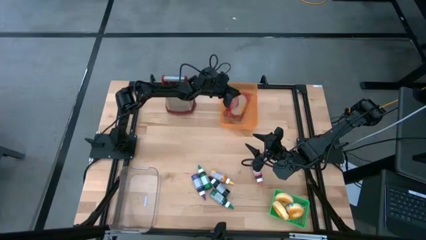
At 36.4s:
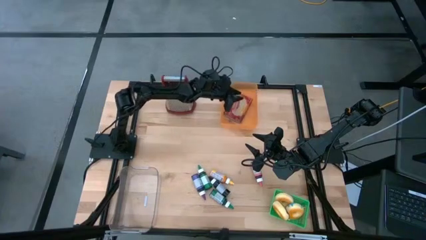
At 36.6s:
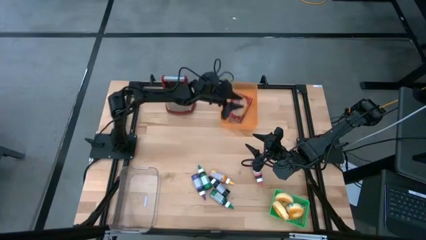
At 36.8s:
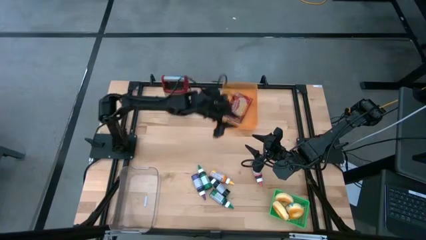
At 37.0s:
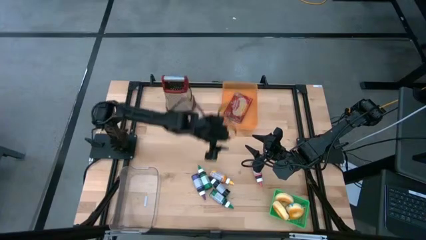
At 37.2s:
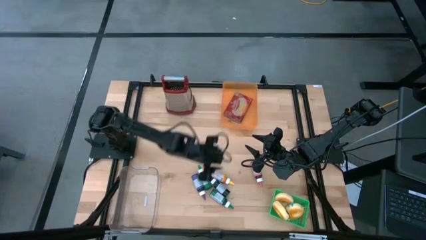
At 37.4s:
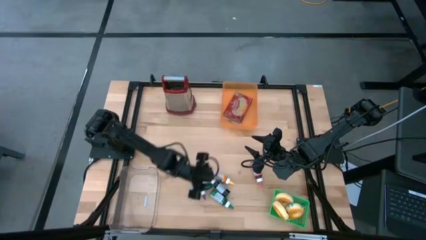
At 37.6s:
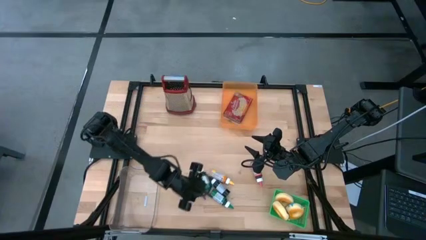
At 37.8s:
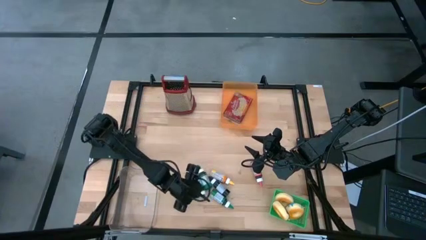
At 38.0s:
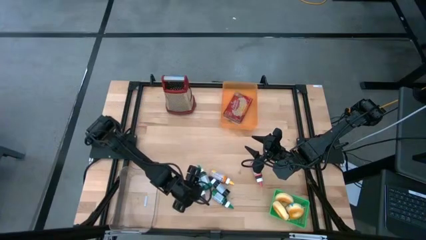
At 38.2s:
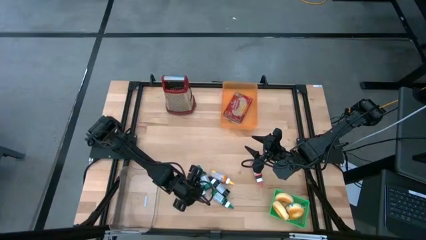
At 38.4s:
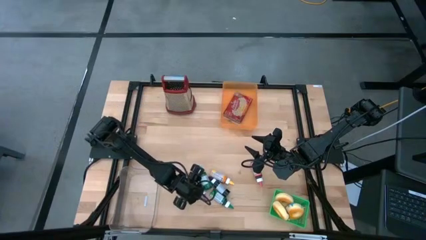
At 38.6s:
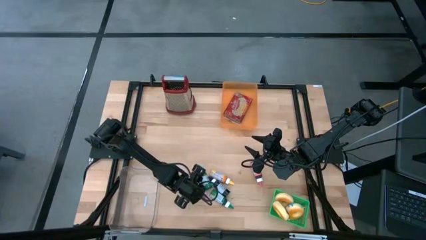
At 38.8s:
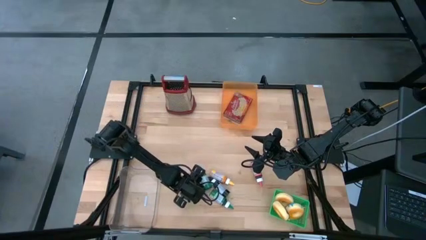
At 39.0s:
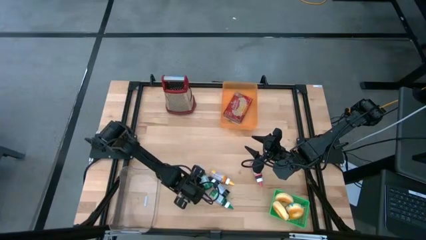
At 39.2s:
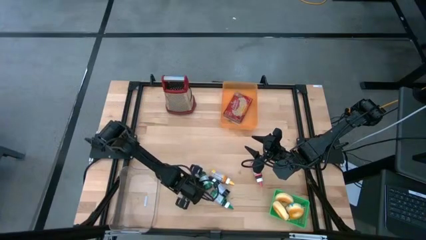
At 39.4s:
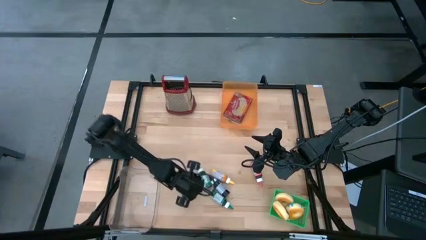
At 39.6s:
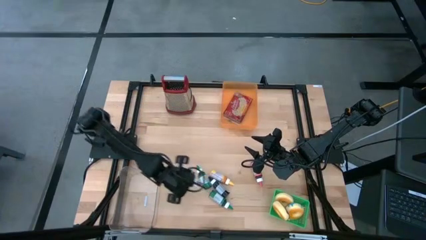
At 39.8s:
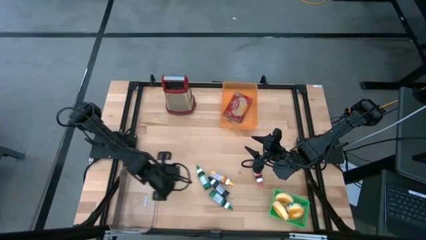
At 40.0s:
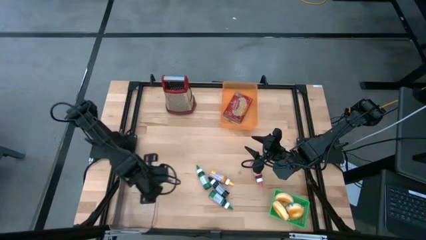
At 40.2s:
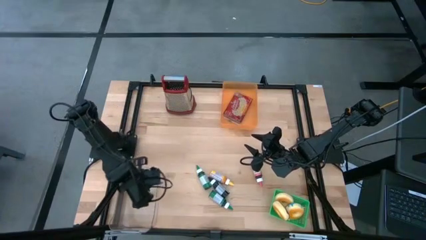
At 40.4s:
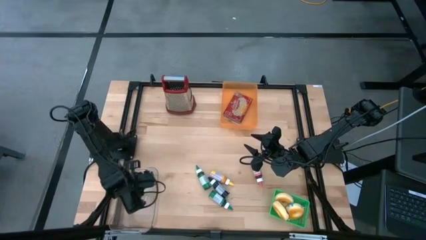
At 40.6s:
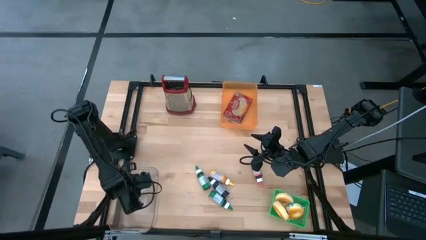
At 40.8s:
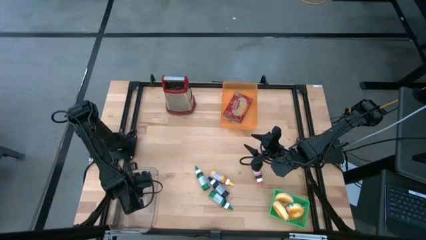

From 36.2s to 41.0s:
Put the violet food coloring bottle into the transparent bin

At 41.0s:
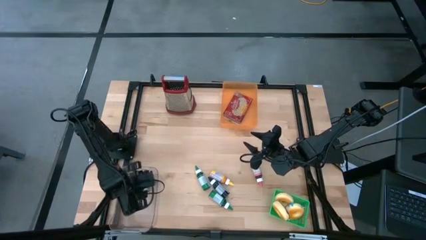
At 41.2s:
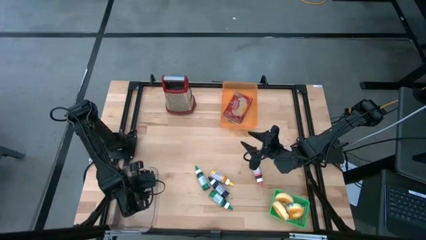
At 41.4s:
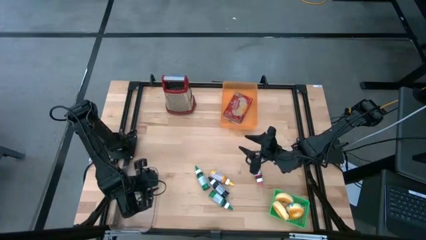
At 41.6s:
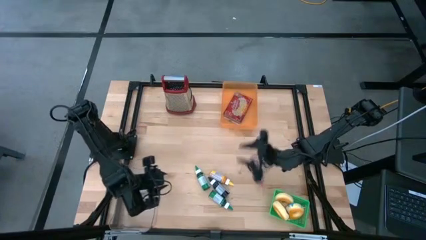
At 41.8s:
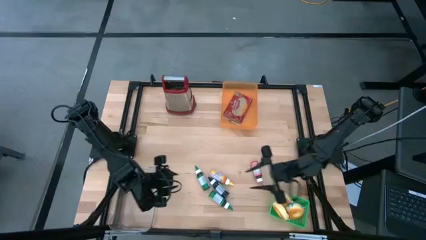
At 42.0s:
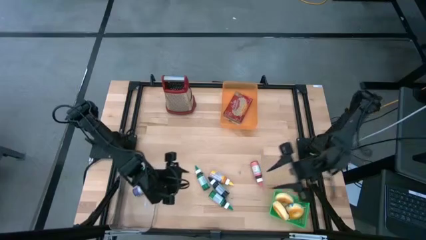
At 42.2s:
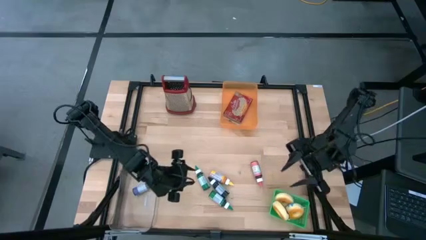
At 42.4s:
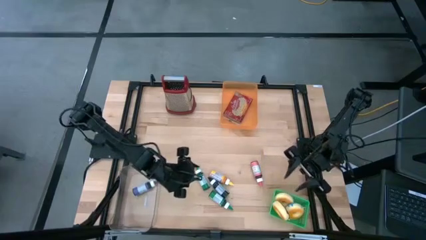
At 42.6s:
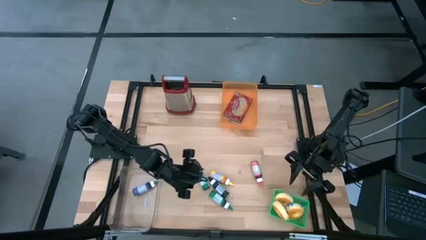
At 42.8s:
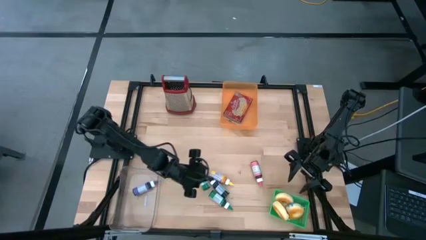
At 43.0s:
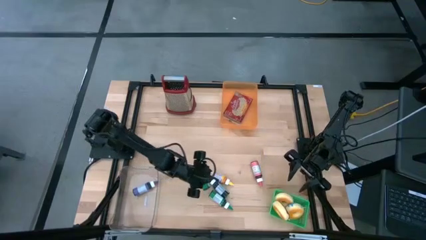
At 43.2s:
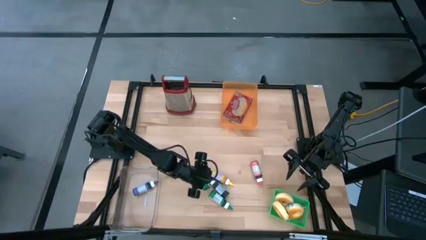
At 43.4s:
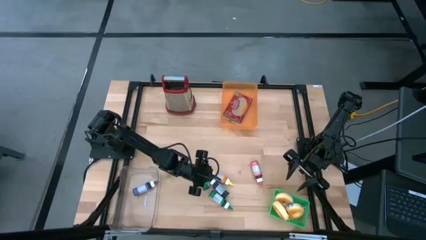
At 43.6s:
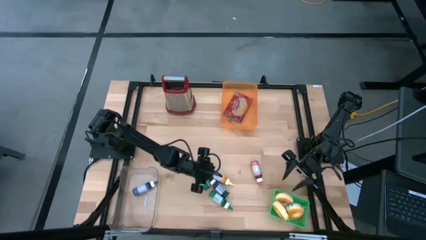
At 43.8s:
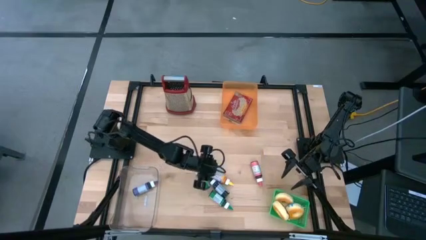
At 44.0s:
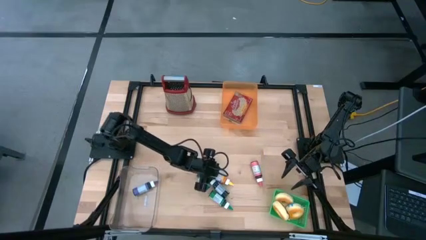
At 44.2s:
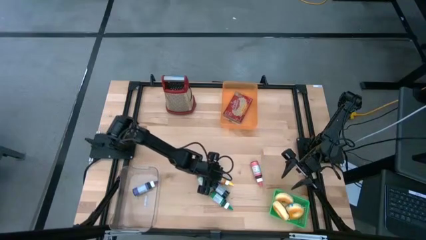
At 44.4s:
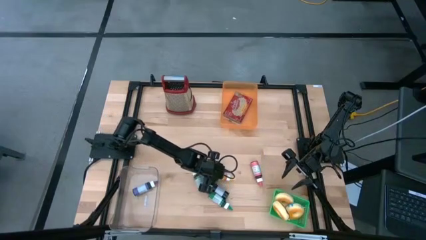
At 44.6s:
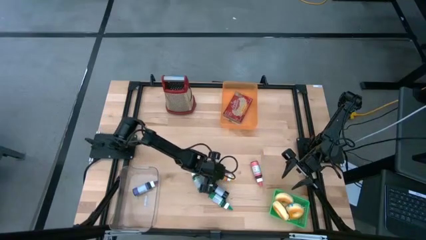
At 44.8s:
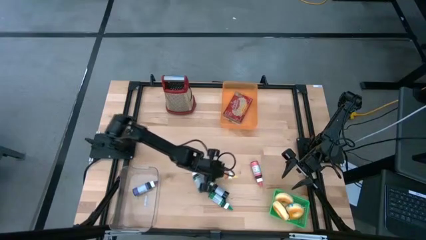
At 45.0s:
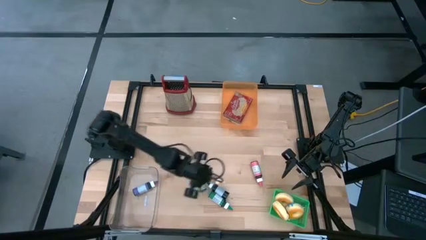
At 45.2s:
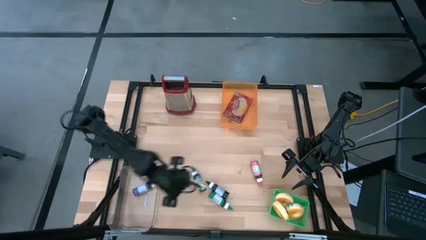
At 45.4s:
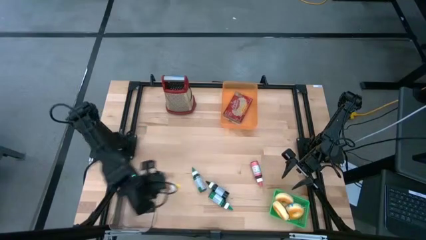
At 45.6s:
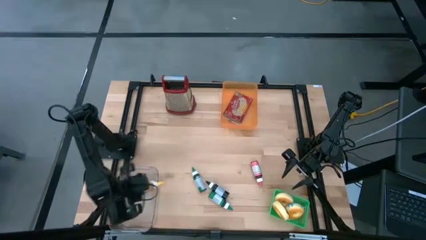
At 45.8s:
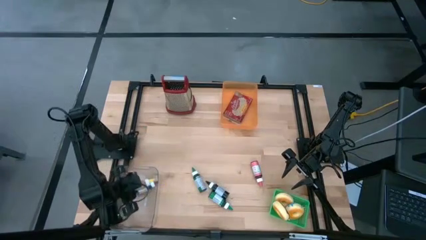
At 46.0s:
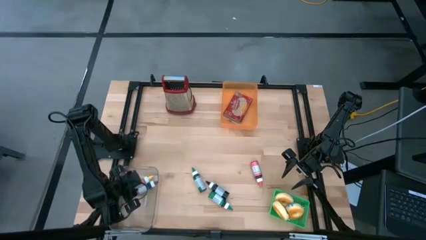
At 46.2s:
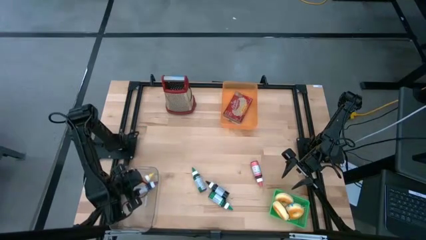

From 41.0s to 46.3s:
Put the yellow food coloring bottle into the transparent bin

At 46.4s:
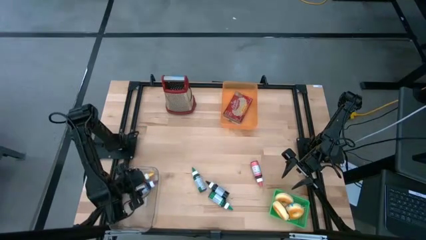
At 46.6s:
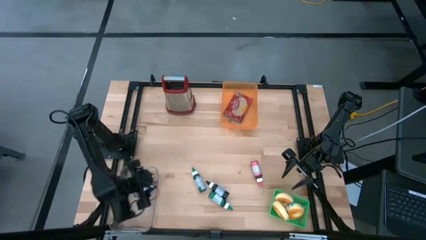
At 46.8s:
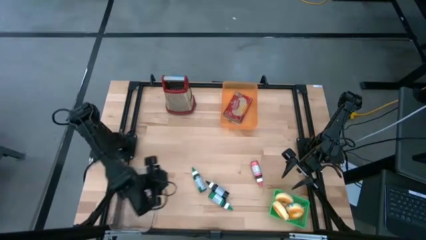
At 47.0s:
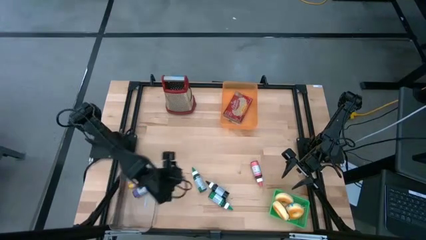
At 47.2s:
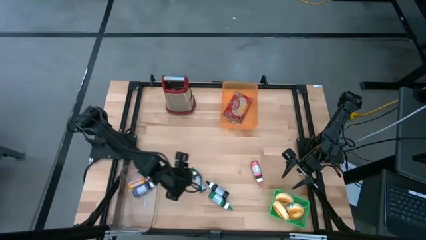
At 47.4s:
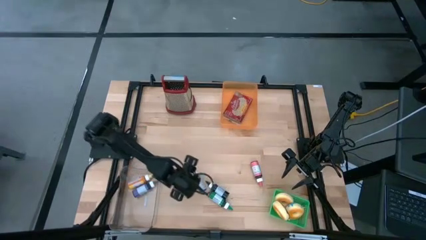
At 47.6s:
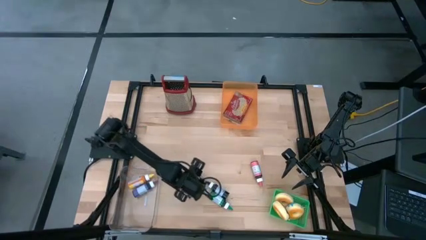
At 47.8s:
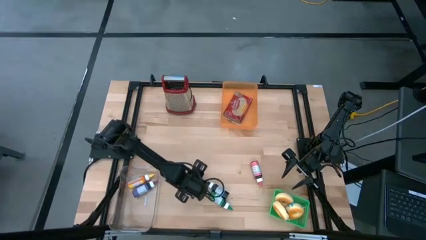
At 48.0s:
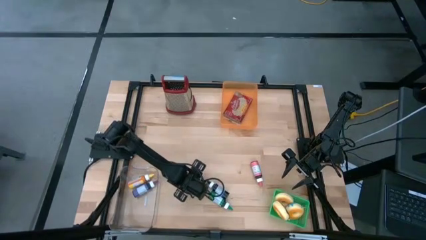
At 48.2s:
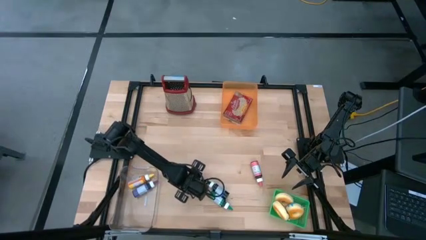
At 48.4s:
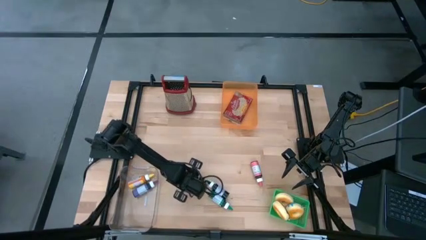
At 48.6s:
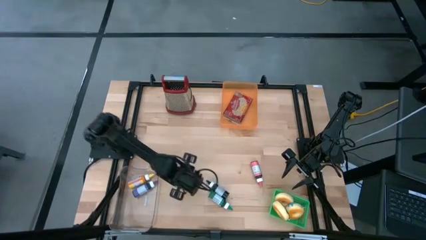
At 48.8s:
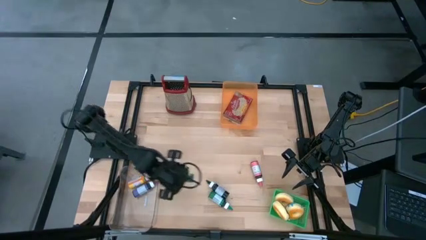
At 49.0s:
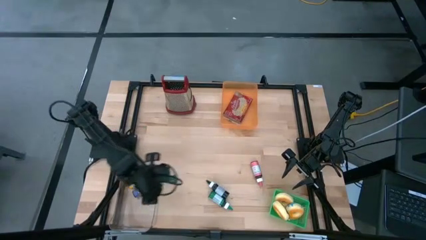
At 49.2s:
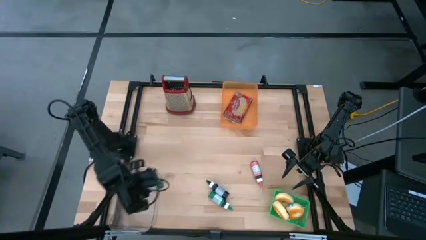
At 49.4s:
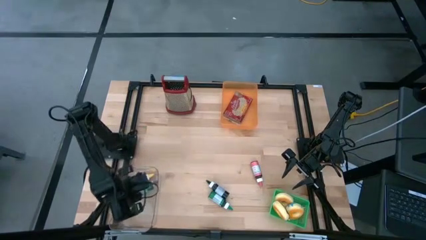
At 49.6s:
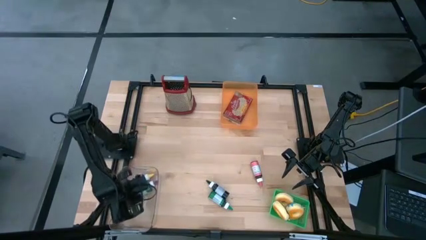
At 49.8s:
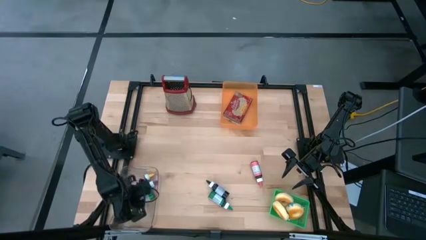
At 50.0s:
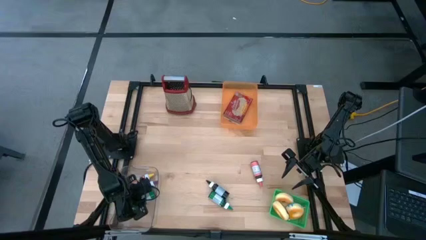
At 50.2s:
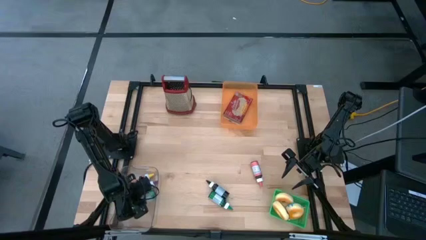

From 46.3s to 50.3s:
Put the green food coloring bottle into the transparent bin
